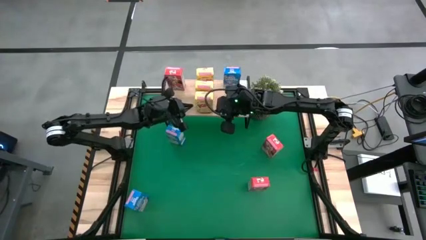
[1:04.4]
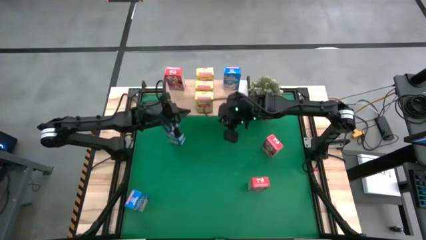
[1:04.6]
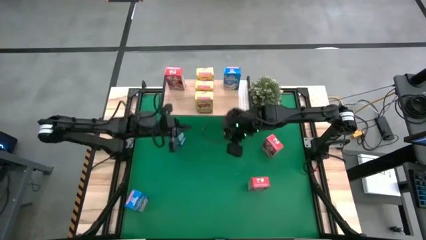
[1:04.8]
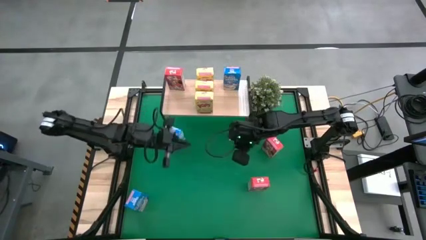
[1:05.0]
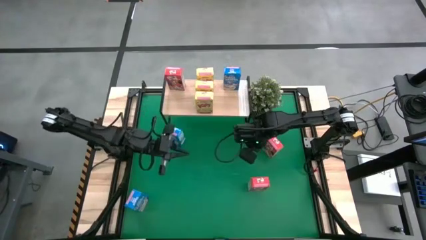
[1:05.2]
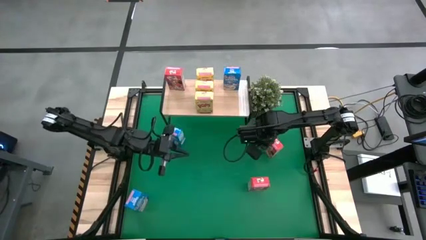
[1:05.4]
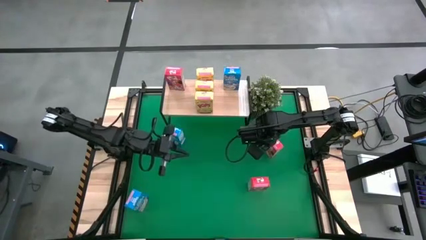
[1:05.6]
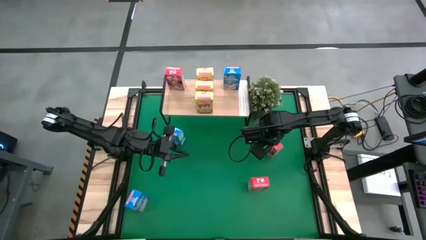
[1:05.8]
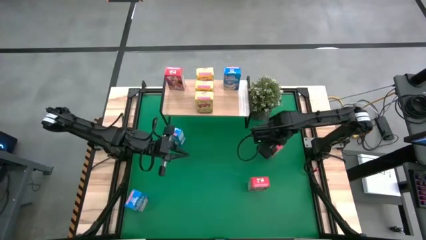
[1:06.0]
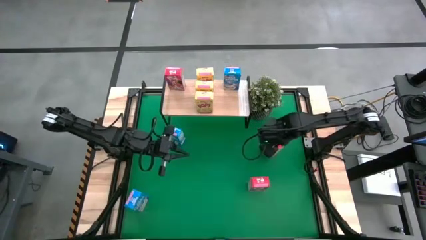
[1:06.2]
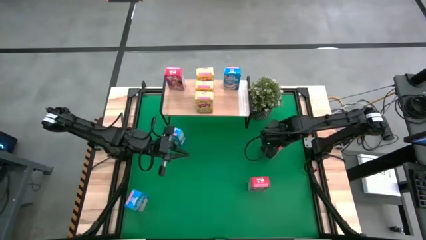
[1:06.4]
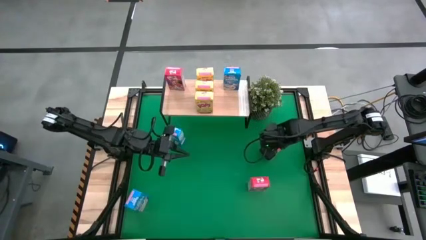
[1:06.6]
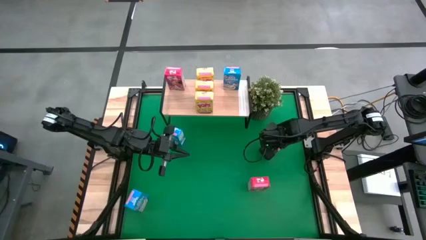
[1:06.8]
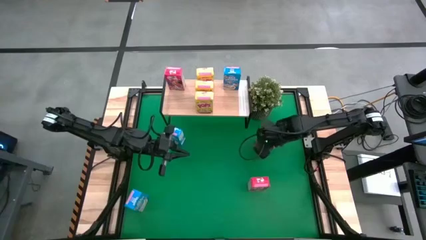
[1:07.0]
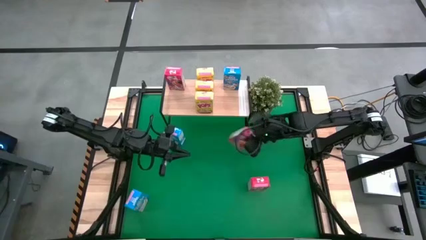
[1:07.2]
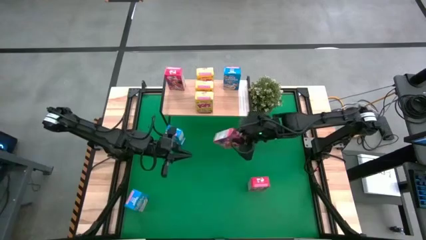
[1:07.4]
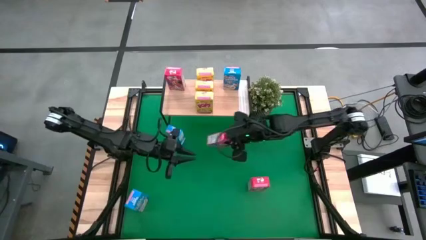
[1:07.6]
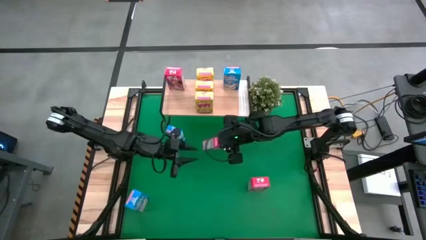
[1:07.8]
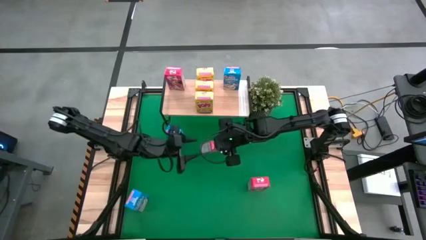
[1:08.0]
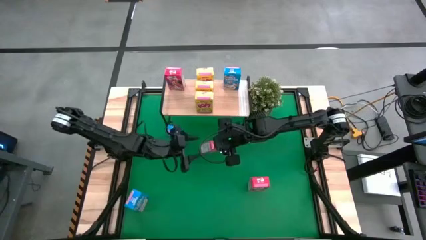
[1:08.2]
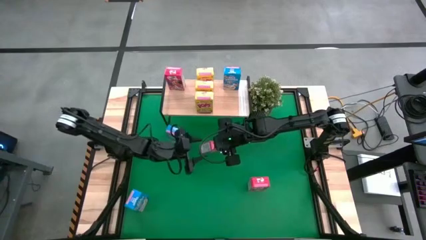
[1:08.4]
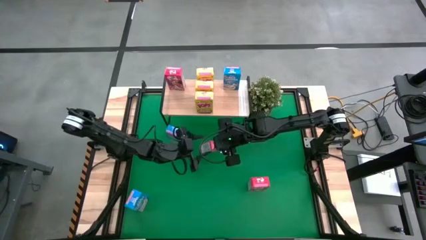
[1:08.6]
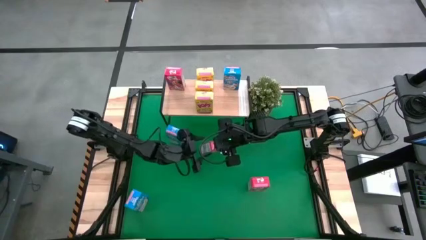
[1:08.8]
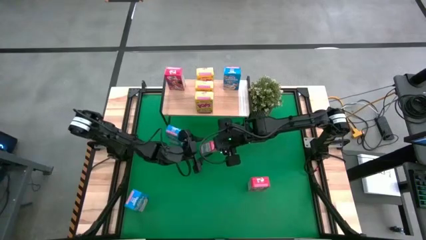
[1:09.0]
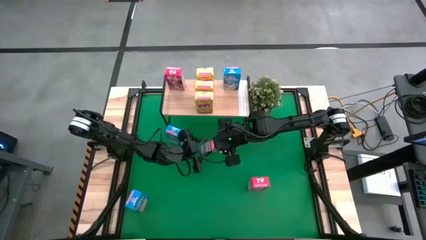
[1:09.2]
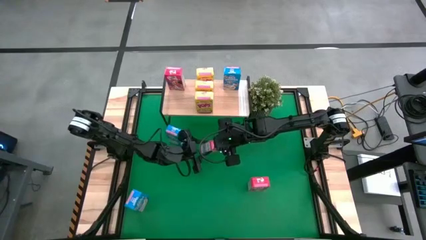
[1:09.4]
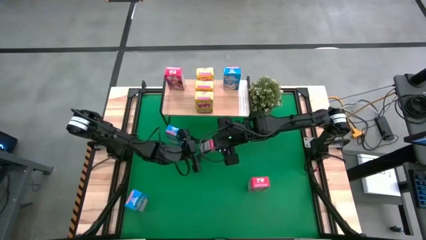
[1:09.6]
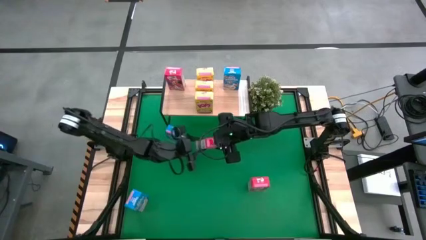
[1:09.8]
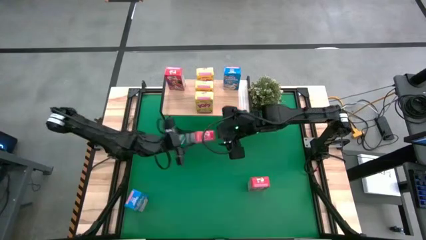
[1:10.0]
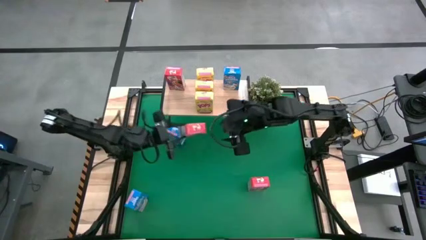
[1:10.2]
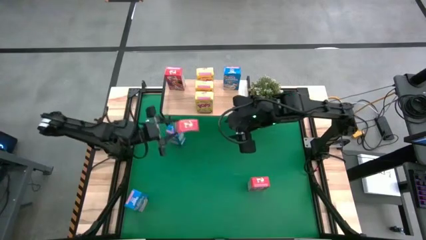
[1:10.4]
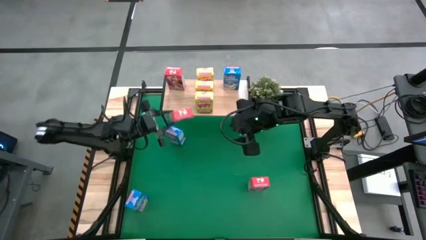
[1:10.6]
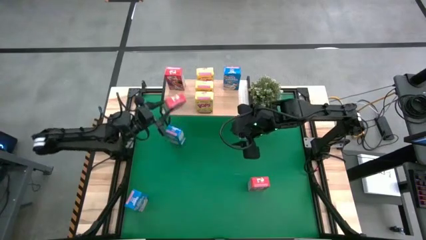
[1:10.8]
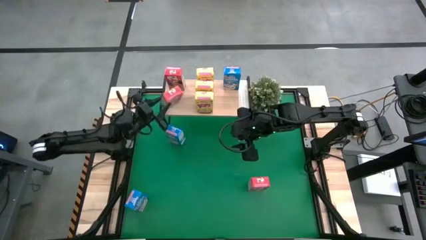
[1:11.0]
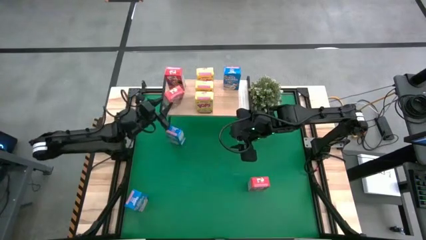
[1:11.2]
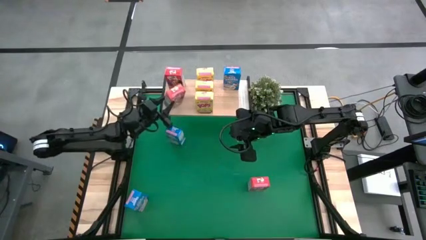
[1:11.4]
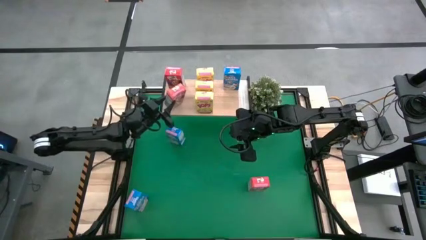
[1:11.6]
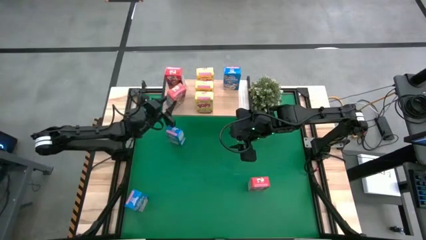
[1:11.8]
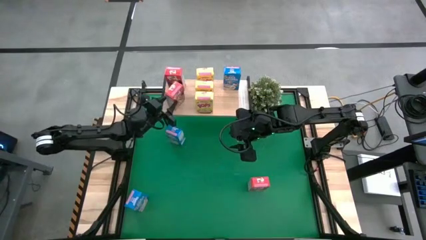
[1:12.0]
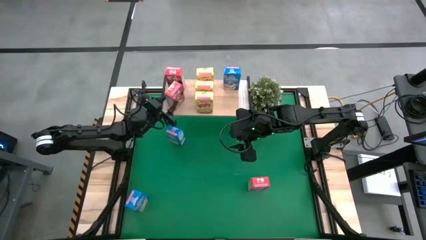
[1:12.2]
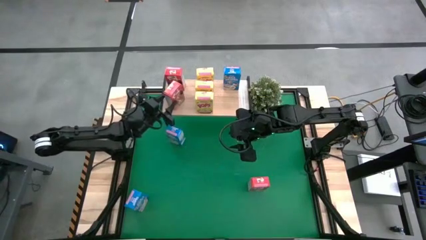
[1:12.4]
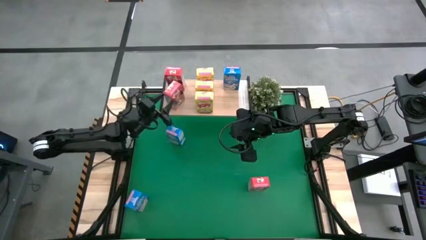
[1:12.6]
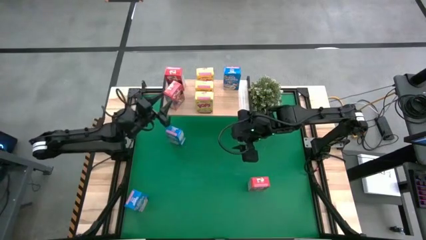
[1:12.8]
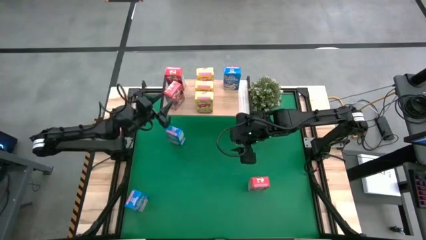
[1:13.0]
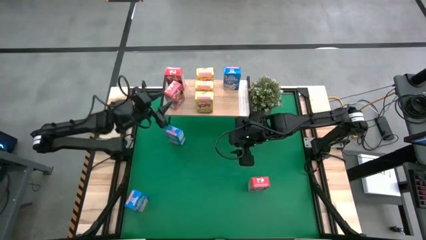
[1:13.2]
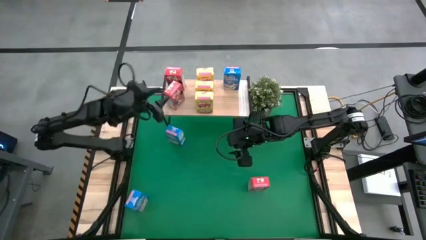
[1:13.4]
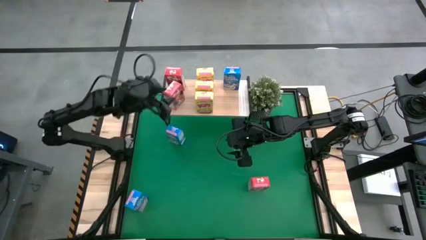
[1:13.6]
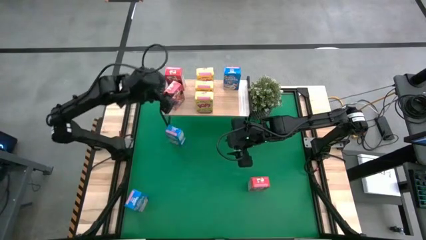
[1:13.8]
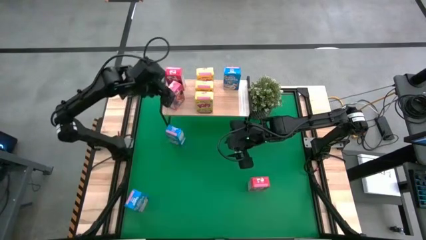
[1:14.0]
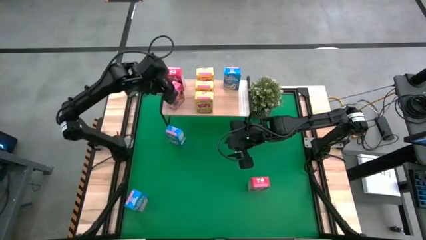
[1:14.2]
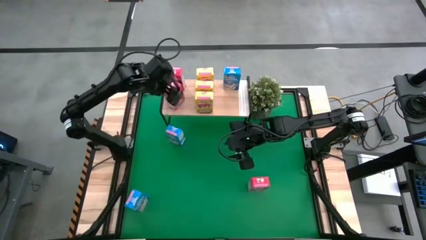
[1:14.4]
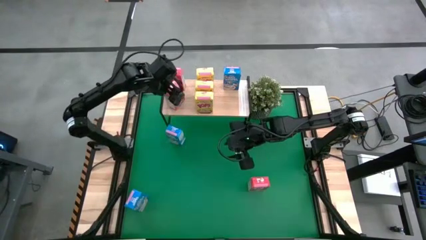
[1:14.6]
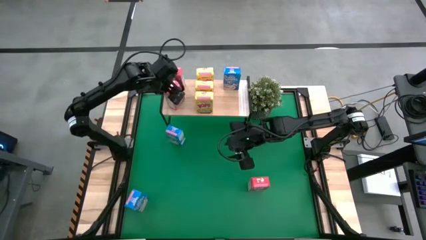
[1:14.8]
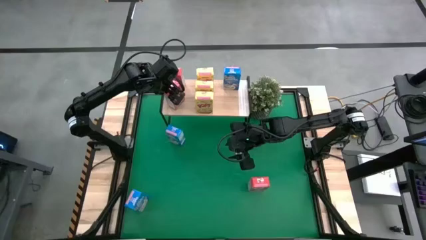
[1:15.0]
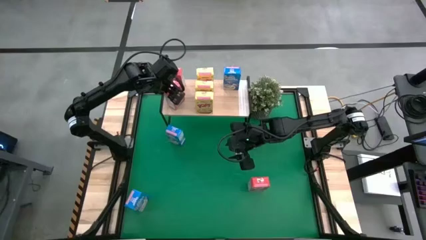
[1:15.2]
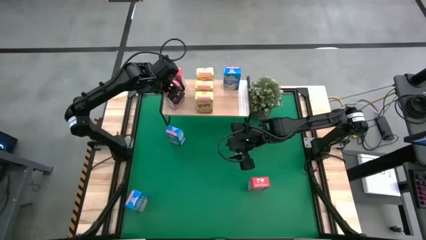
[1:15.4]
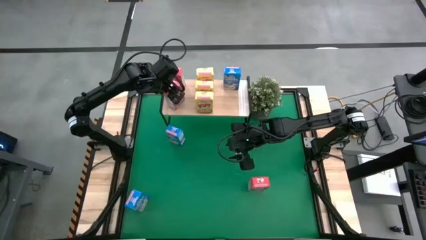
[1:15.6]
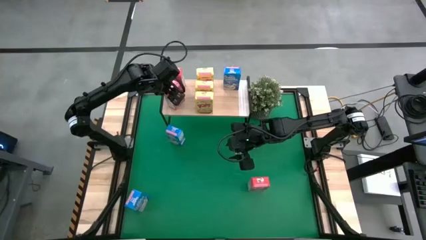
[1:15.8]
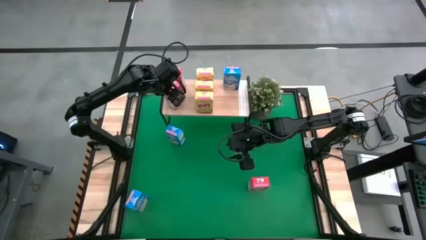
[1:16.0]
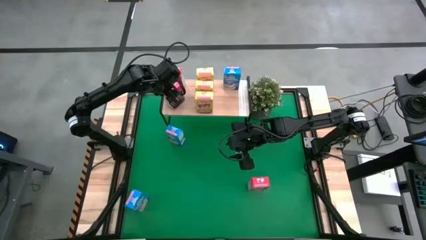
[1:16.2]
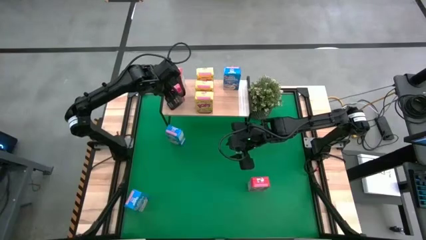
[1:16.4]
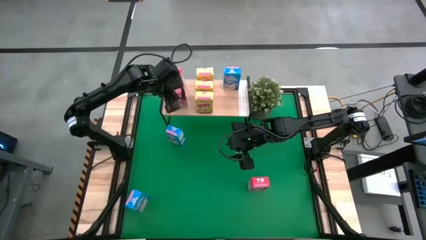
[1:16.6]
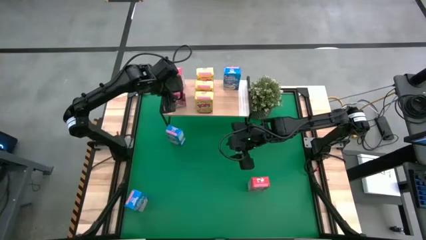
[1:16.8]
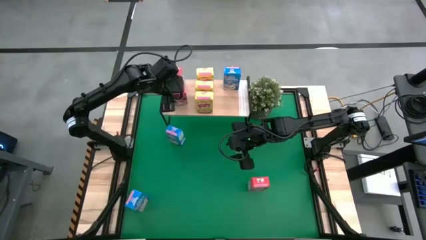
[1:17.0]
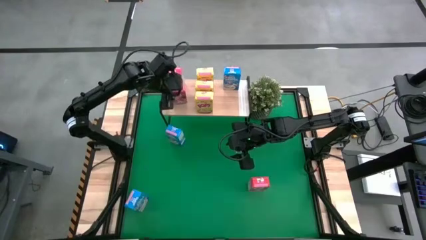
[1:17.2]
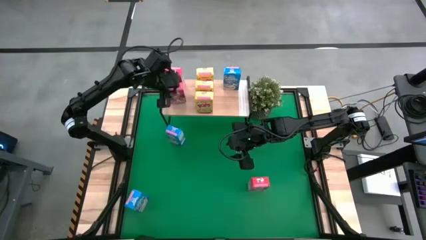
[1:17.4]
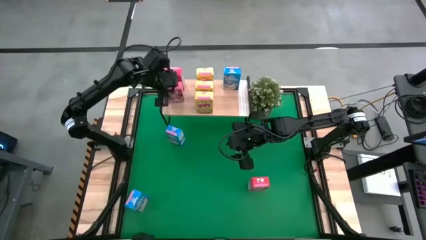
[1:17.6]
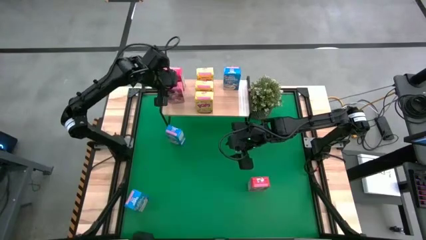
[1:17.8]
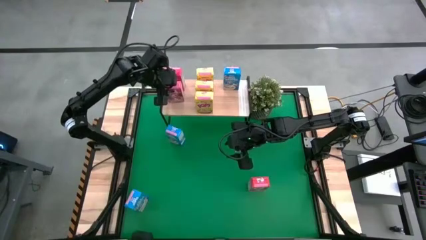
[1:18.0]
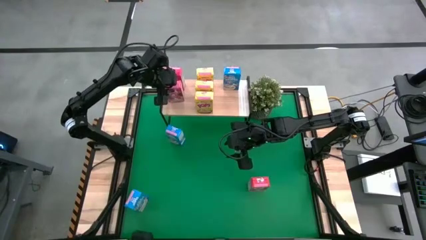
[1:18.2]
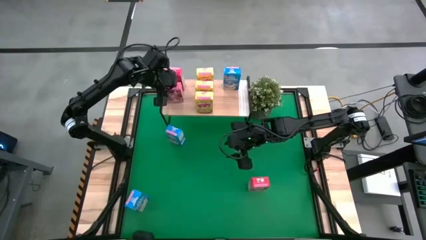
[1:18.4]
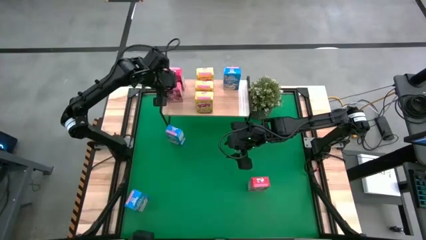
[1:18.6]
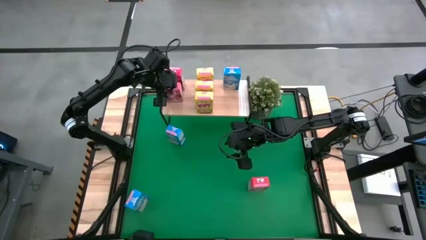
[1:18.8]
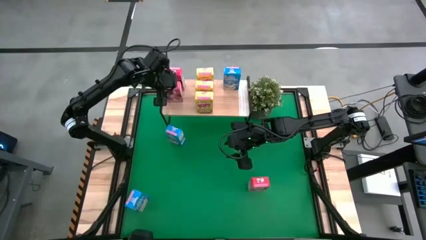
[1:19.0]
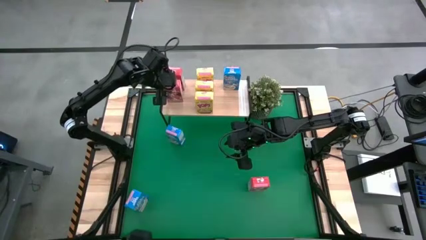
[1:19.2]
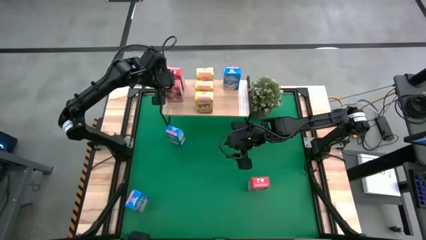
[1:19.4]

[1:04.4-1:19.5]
Task: Stack cereal on shelf
Put the top red cereal box on the shelf aligned with the other red cereal box

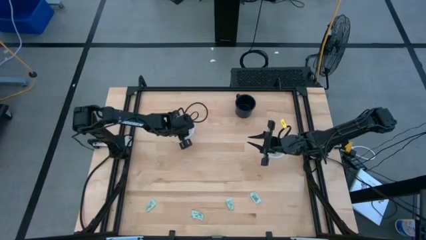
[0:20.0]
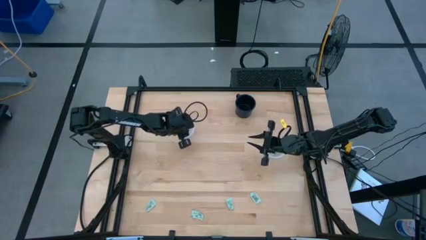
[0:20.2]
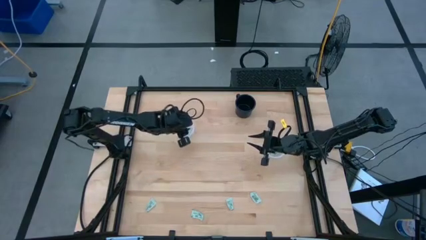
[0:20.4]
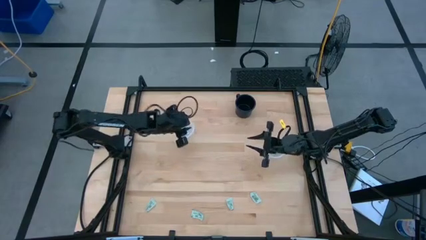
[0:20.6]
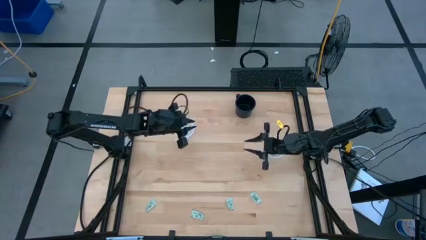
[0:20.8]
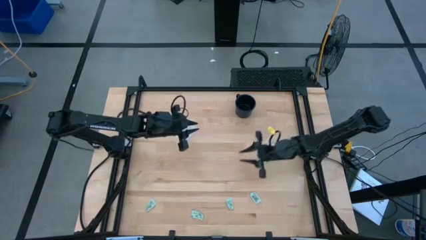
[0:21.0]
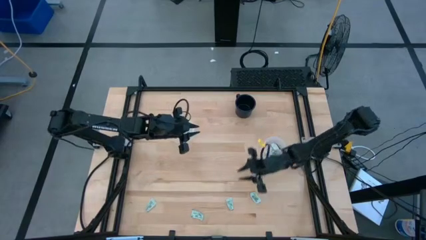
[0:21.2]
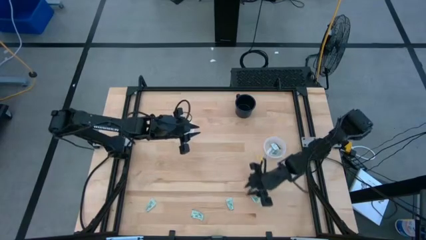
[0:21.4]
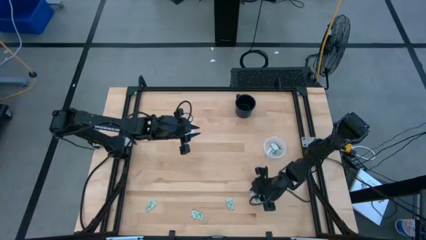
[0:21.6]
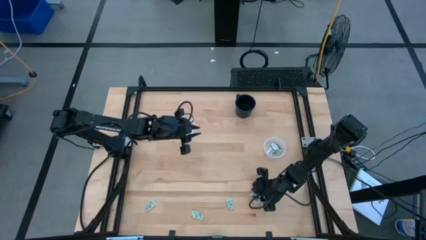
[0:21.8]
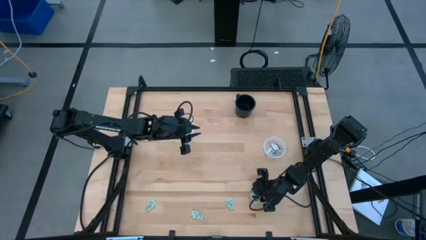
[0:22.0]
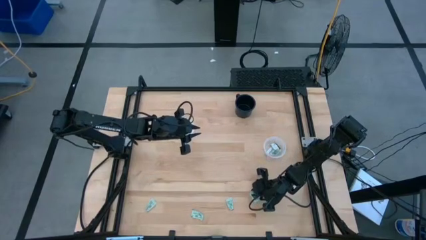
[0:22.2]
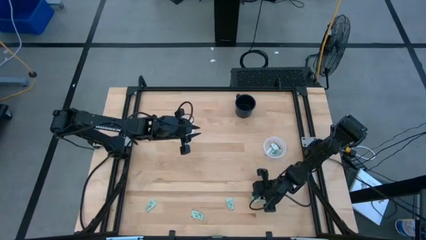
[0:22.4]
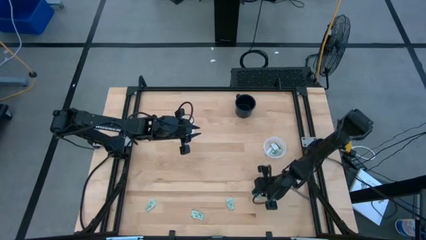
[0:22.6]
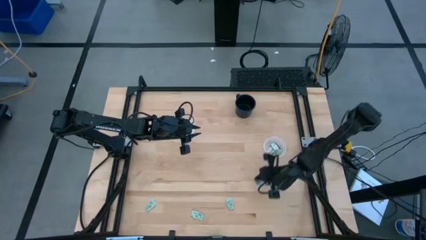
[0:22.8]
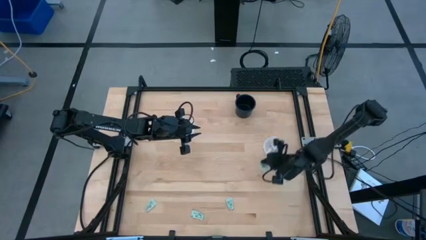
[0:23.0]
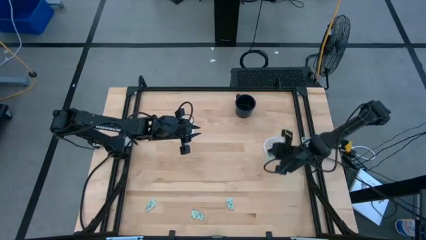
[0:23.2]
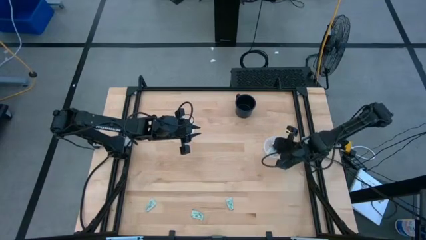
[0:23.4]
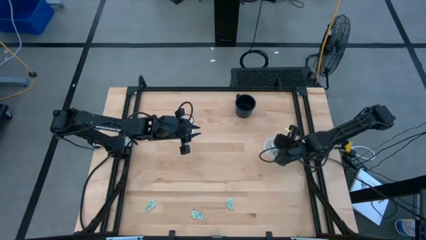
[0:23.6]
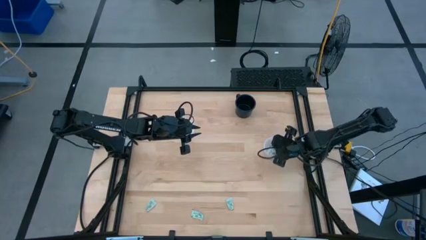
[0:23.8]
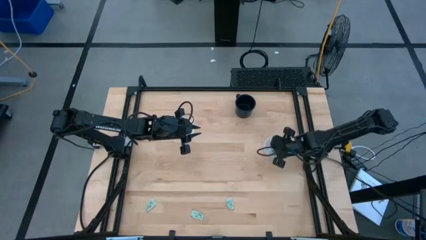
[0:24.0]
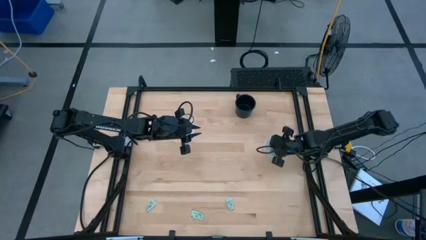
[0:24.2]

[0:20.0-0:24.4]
Task: Pick and place items into bin
Put the white stevia packet into the right transparent bin
